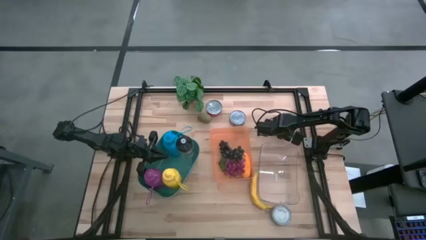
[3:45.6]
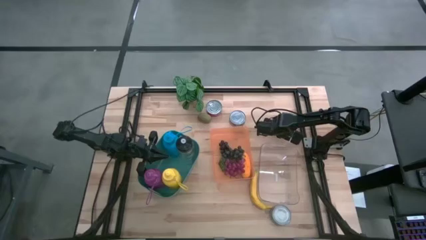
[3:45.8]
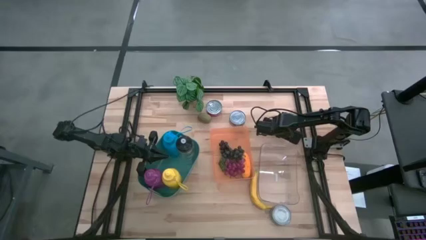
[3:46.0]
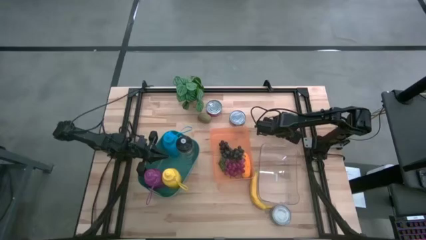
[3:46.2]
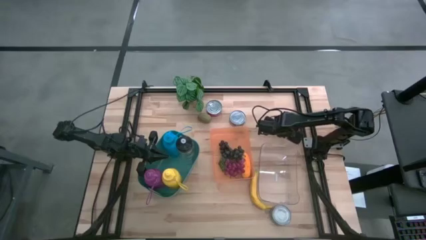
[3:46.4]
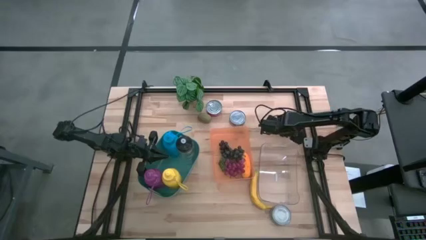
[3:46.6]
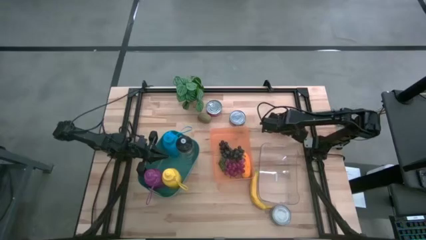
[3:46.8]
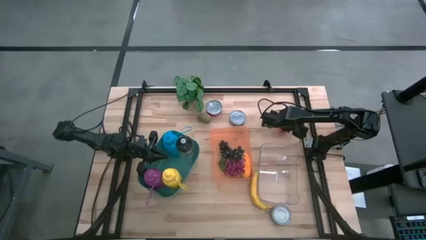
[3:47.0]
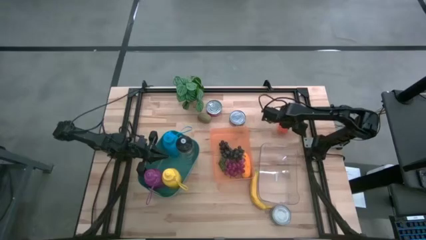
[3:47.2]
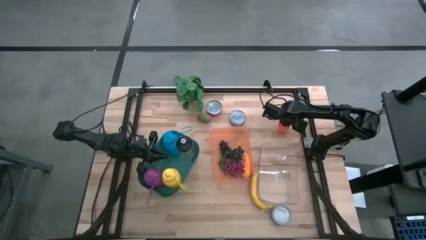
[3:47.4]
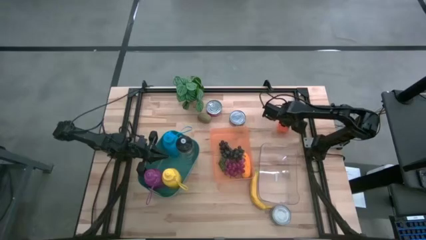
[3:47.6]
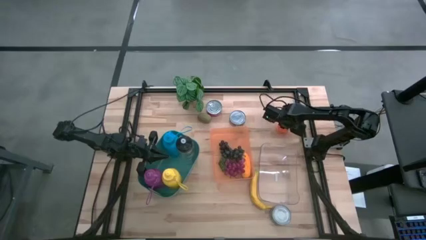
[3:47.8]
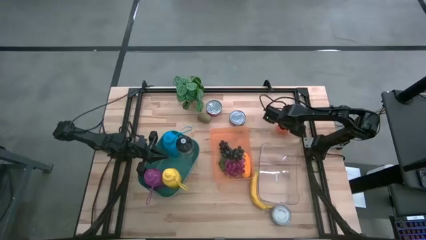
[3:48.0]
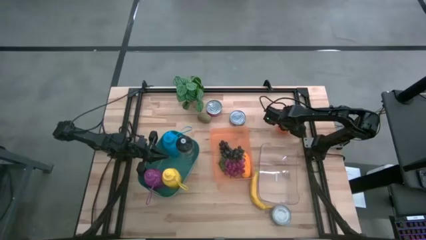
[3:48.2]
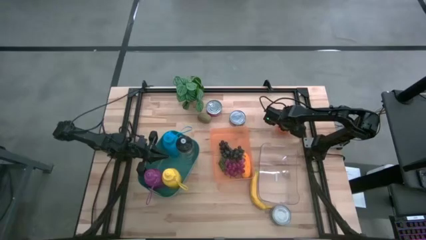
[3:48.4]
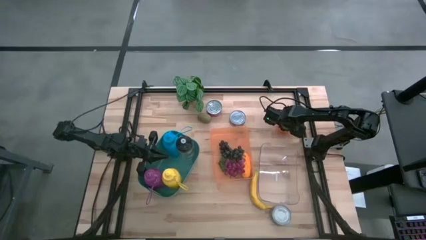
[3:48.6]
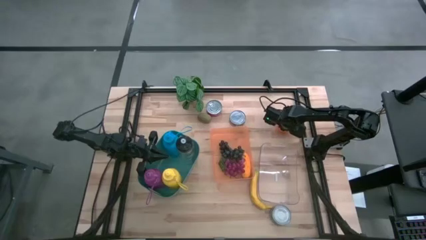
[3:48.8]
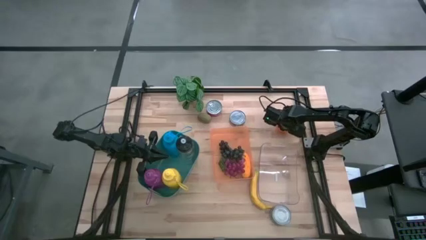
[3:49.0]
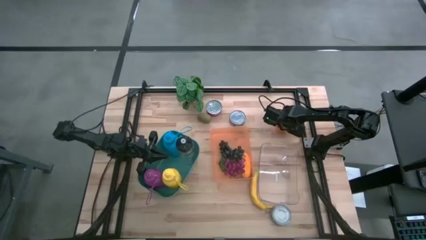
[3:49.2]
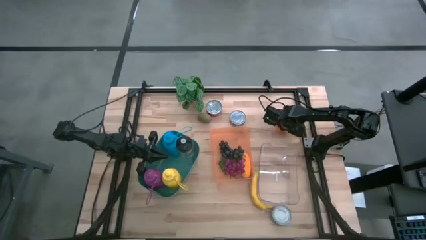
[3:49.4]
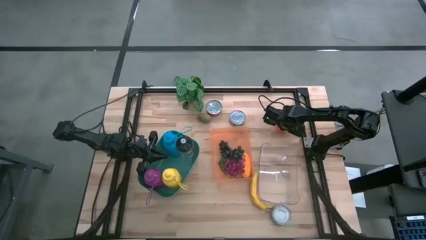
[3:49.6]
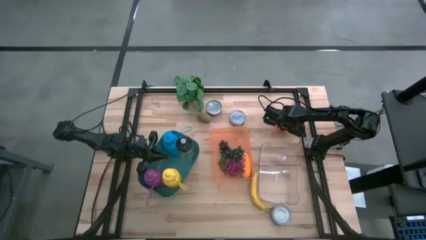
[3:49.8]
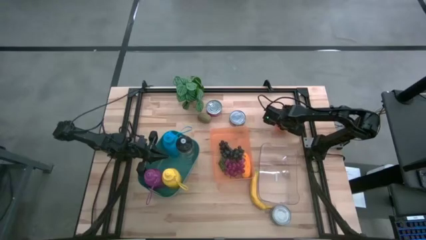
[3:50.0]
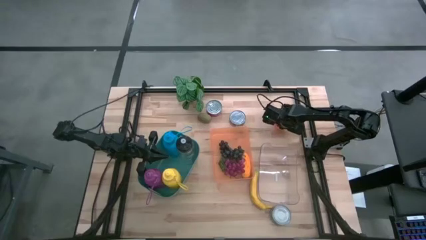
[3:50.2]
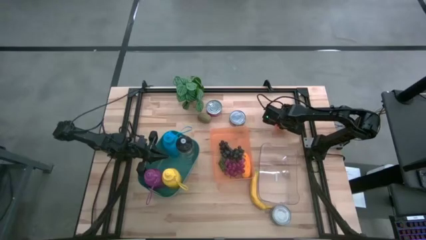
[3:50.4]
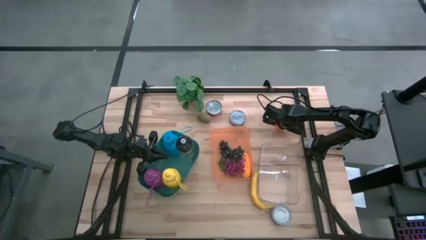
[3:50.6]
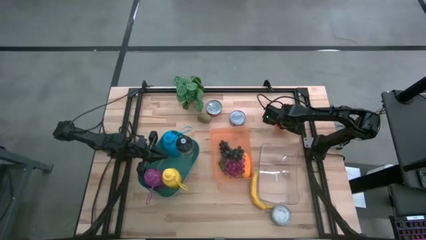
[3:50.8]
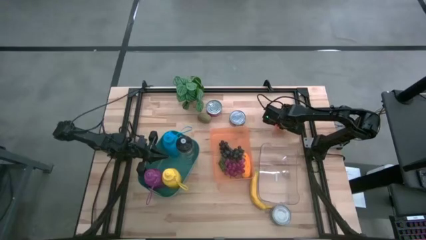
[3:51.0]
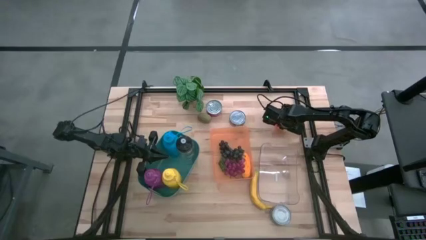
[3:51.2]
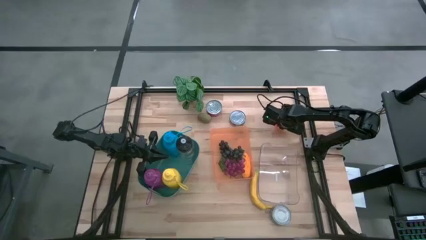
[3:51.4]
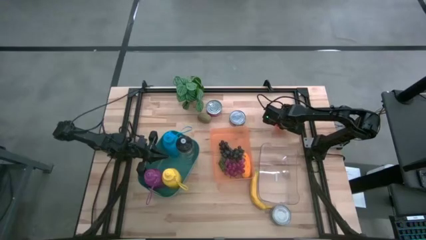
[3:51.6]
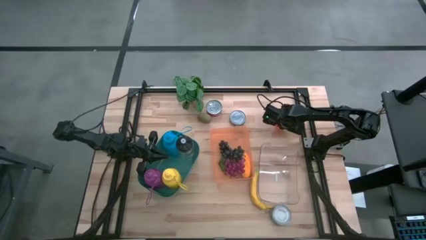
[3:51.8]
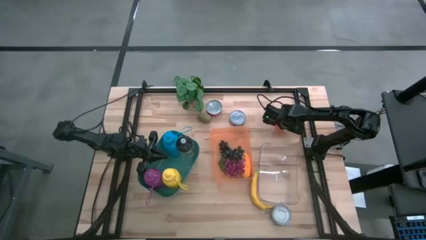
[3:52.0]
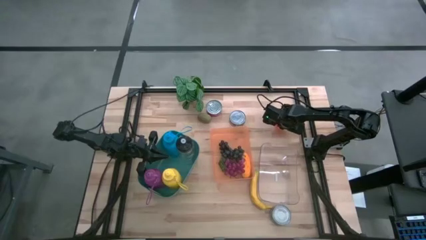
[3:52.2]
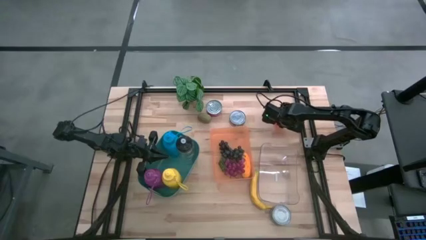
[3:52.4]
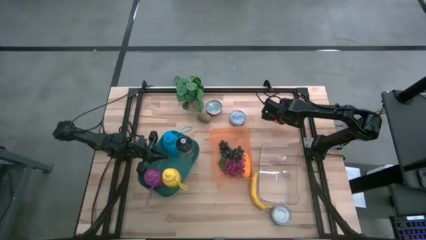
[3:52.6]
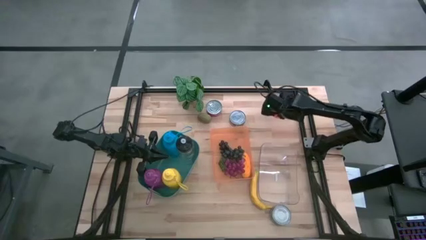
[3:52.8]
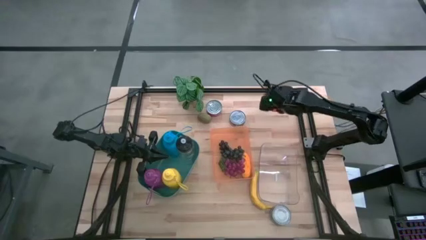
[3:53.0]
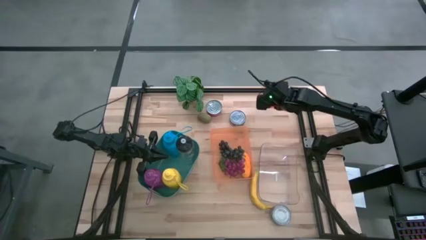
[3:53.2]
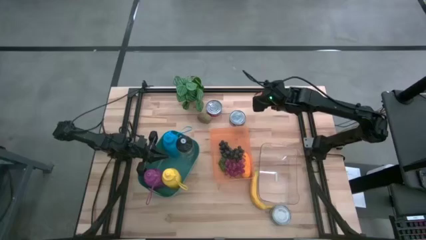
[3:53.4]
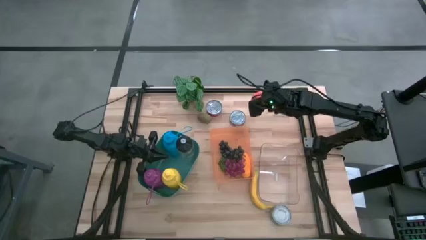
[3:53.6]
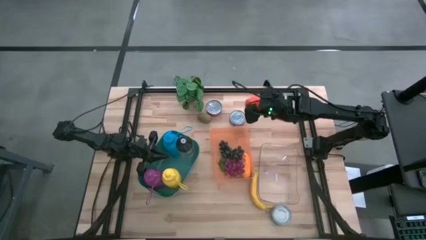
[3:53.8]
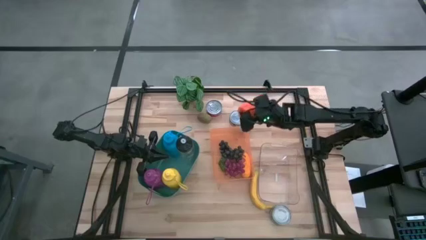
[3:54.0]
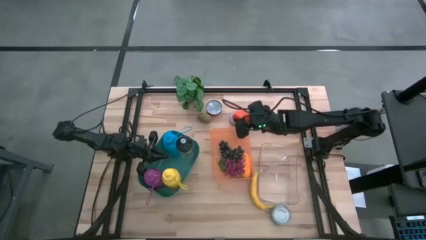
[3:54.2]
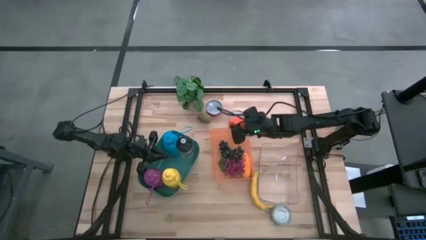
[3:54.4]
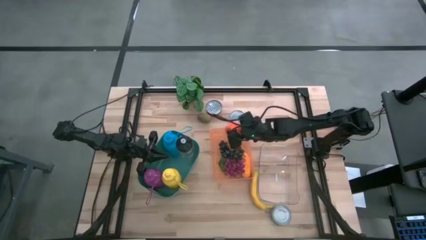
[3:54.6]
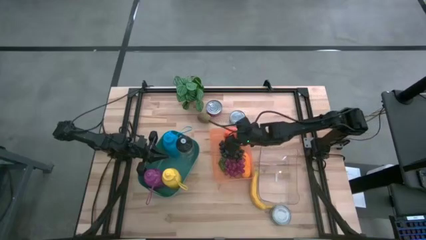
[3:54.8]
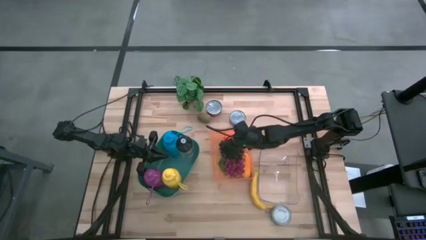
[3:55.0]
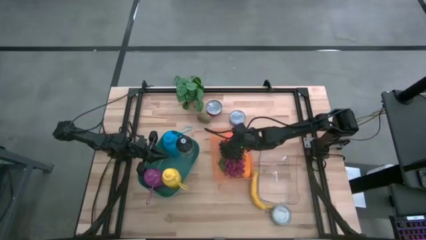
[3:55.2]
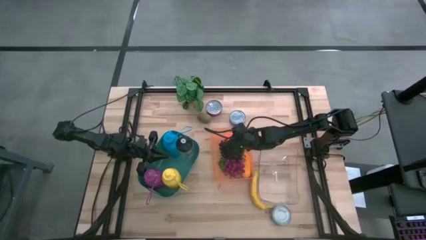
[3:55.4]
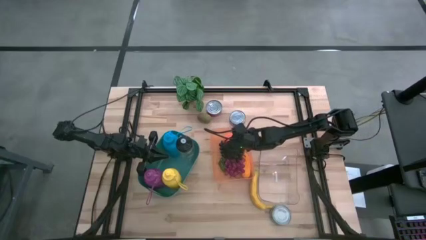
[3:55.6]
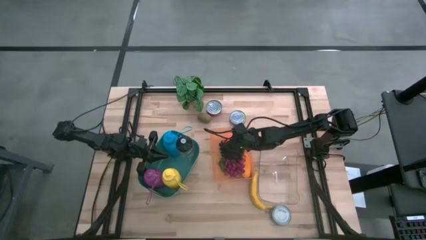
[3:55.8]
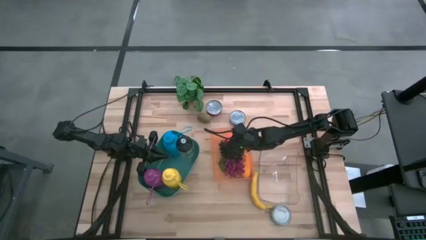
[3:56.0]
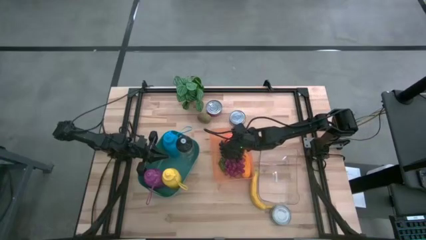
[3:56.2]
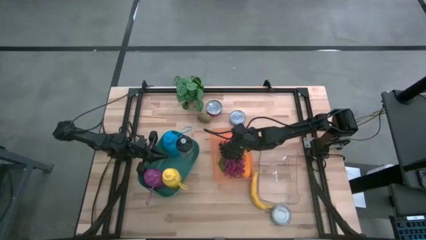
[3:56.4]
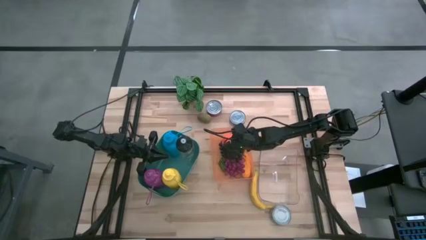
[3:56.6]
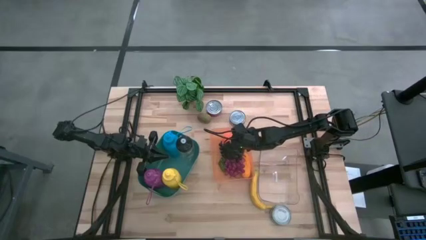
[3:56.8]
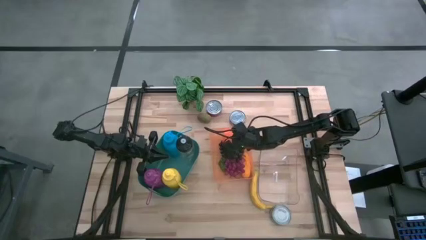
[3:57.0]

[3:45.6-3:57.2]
Task: Pick & Place Food Item
Put the orange into the orange bin
